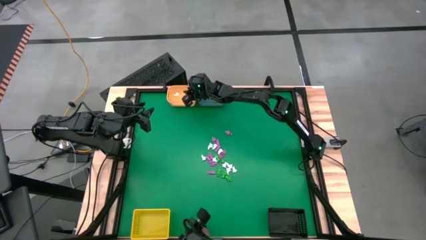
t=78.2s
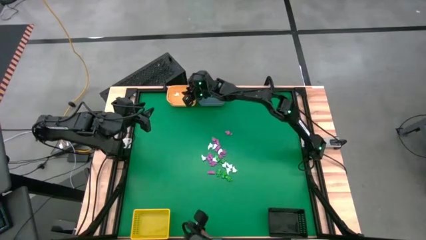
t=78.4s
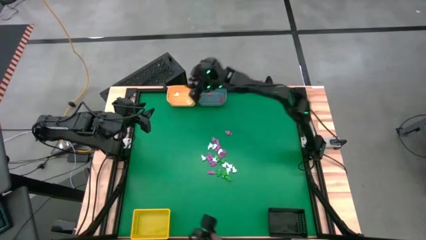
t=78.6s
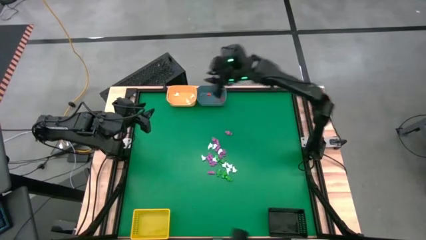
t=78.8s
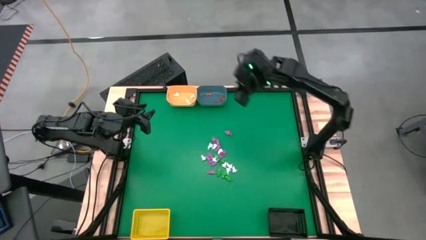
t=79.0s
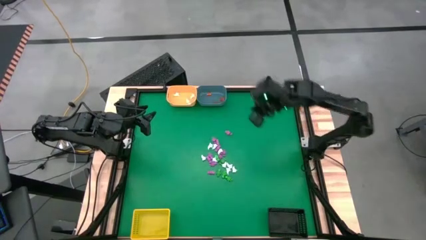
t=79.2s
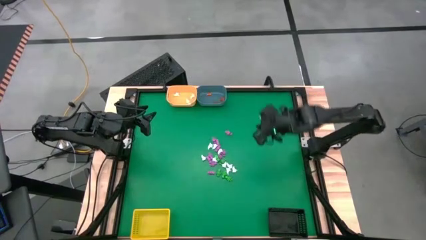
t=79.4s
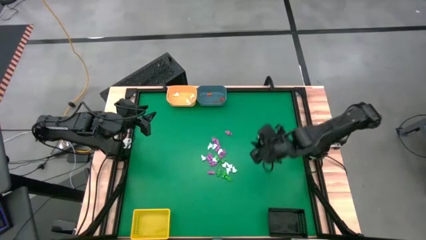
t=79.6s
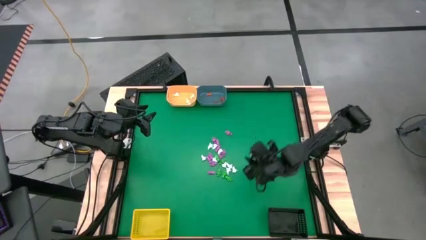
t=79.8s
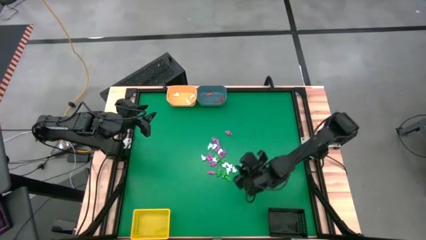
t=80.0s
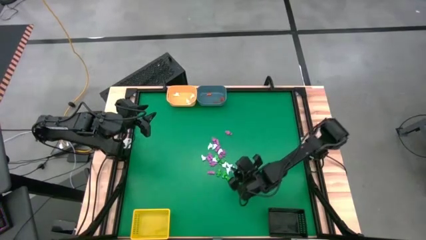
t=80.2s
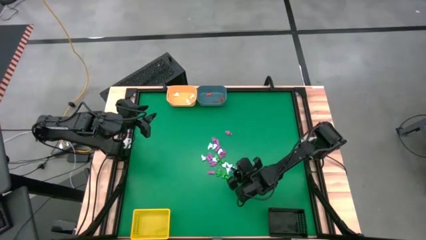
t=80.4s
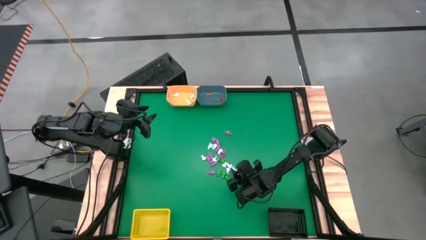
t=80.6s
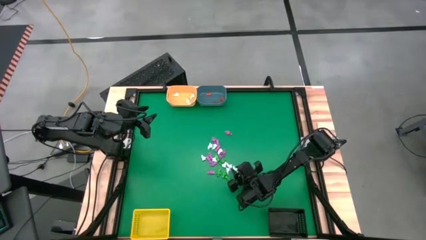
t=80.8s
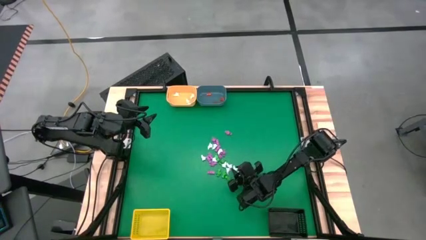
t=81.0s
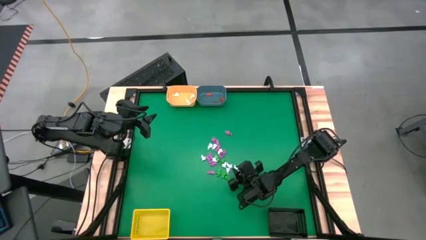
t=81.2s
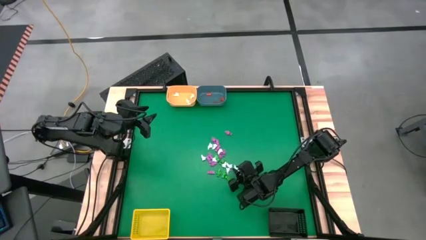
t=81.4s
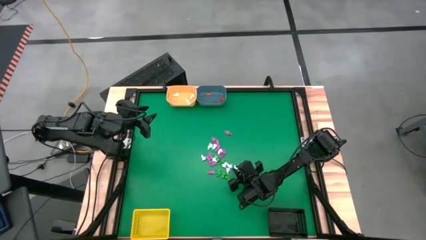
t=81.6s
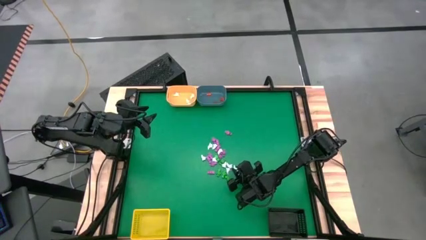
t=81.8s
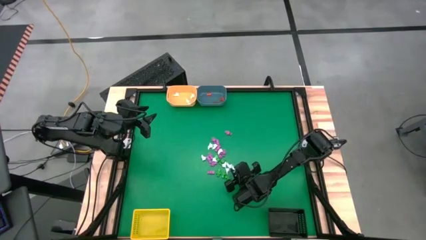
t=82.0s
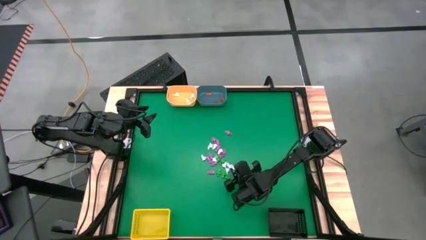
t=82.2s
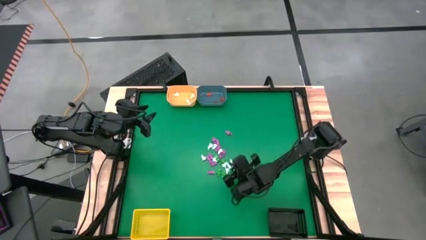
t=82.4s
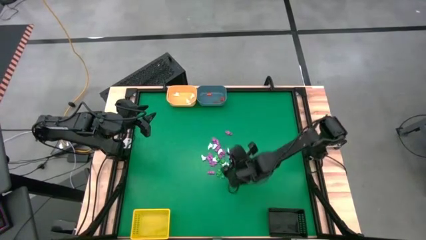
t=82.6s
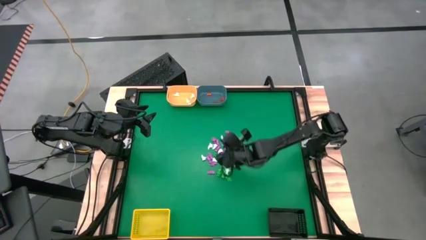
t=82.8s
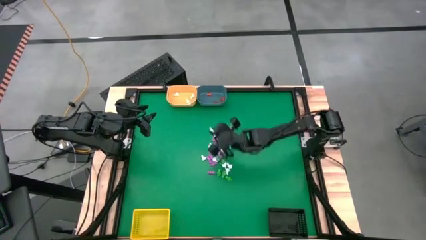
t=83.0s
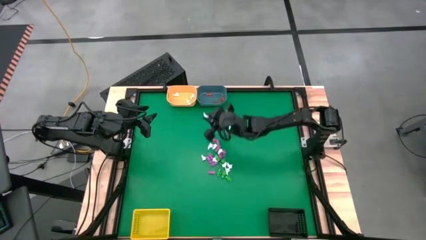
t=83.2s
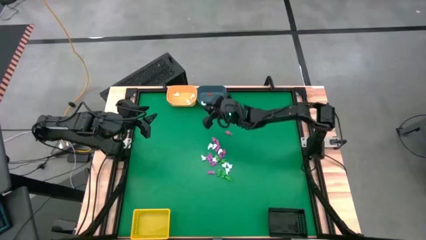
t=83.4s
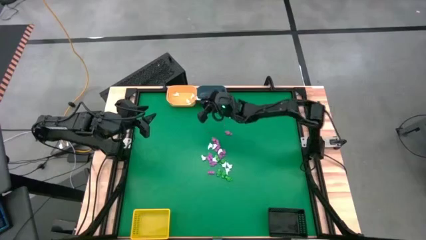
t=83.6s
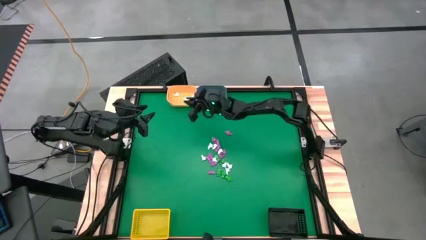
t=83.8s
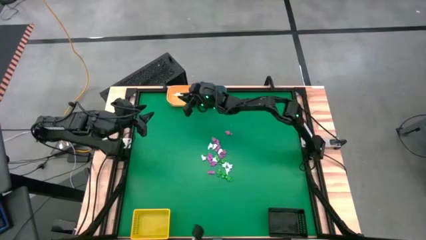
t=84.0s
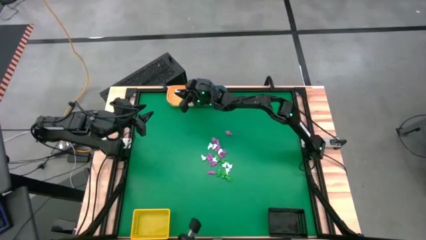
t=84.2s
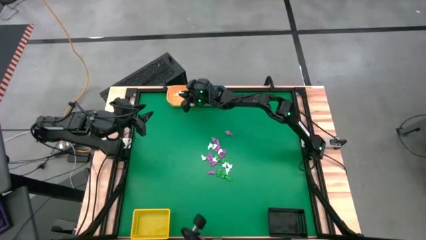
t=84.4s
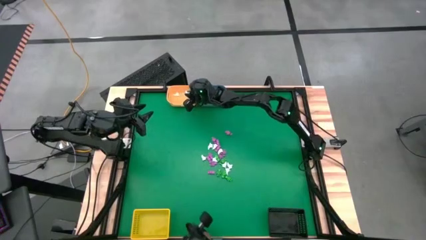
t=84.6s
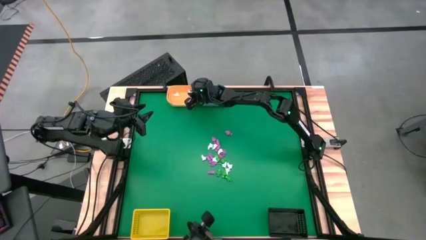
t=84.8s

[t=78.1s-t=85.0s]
Task: Sort Halloween decoration
Put the white ghost into the orange bin

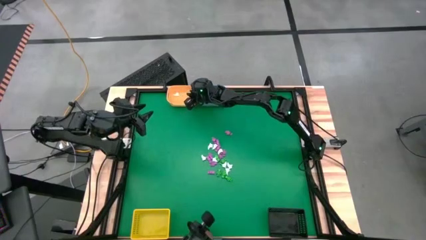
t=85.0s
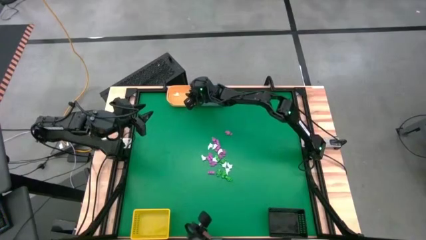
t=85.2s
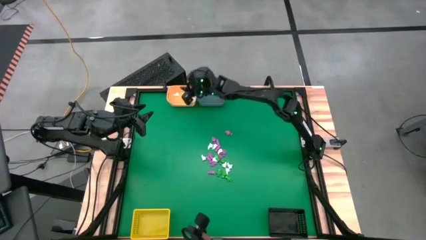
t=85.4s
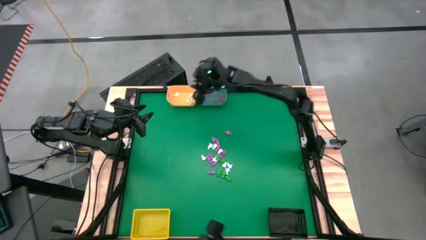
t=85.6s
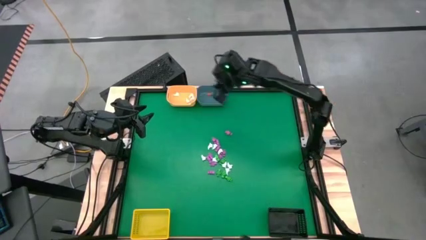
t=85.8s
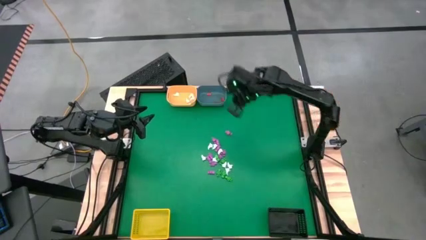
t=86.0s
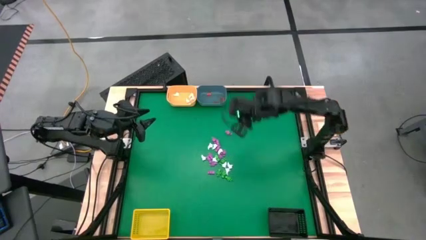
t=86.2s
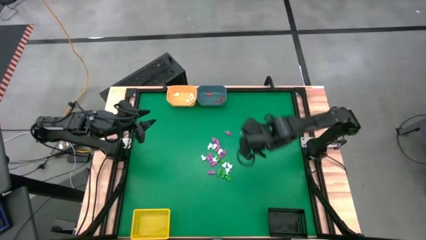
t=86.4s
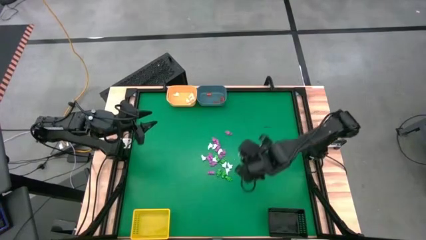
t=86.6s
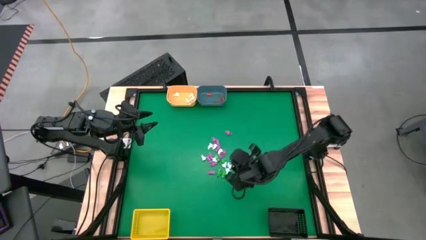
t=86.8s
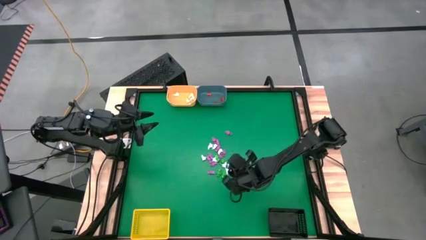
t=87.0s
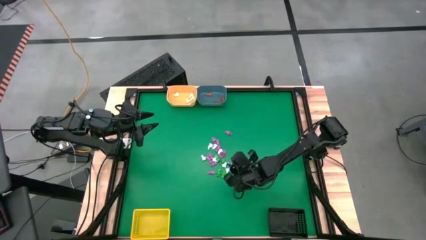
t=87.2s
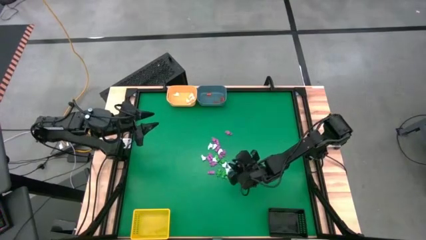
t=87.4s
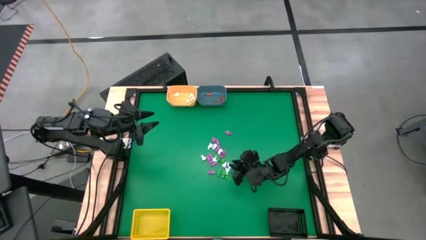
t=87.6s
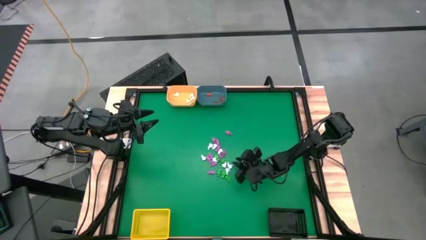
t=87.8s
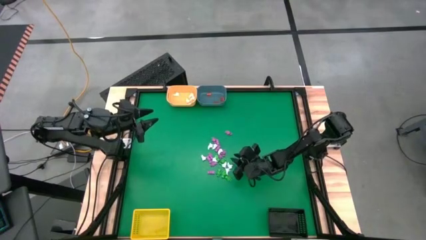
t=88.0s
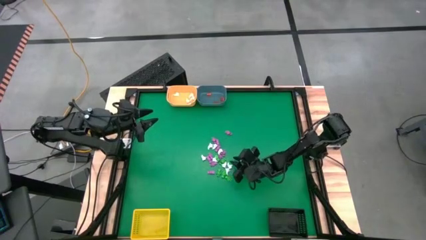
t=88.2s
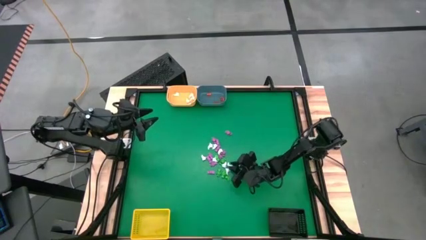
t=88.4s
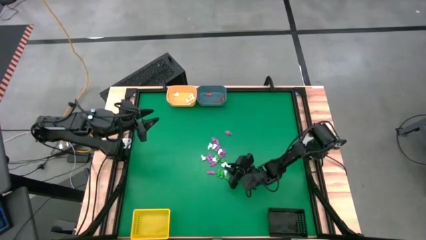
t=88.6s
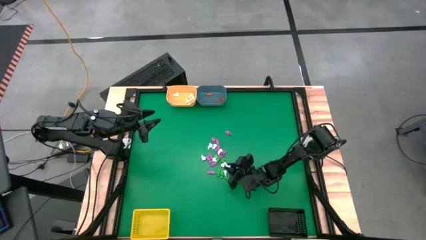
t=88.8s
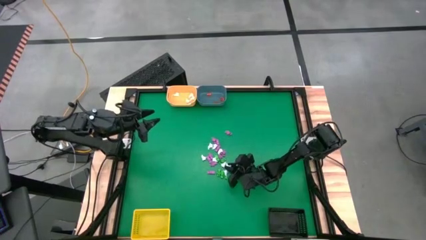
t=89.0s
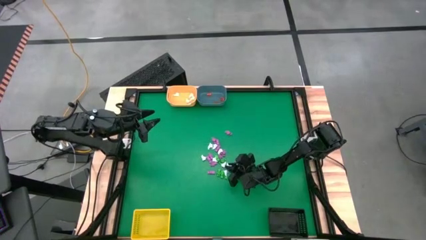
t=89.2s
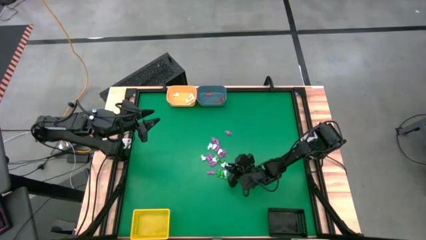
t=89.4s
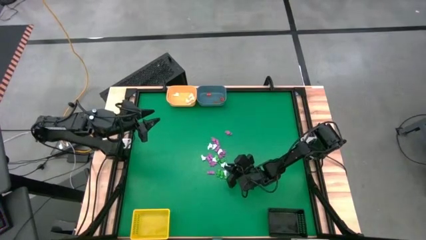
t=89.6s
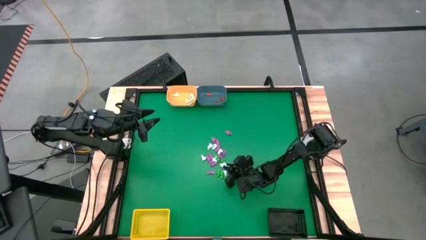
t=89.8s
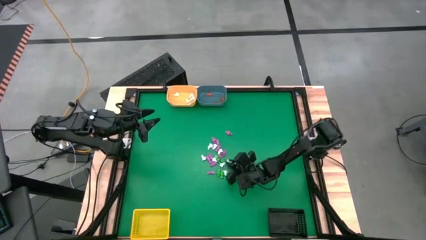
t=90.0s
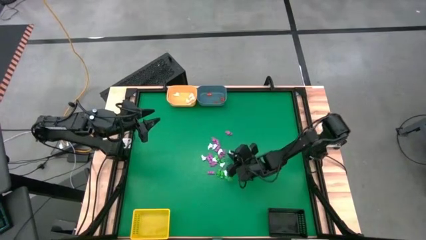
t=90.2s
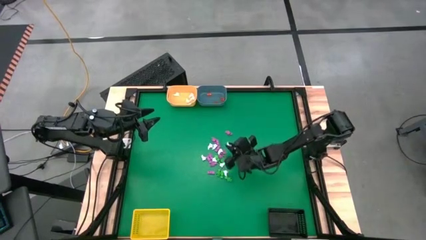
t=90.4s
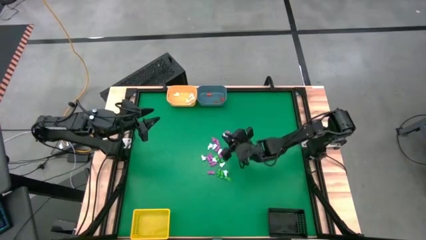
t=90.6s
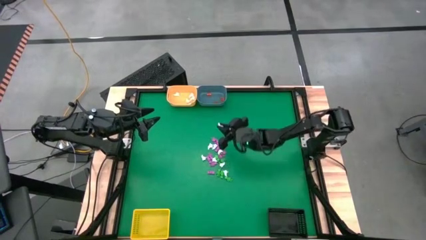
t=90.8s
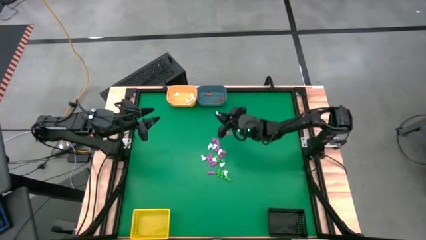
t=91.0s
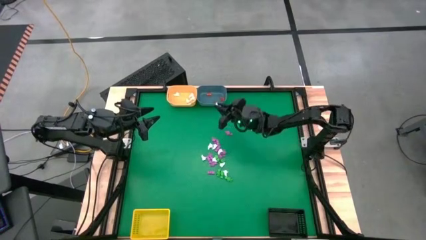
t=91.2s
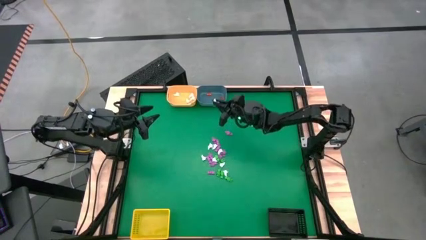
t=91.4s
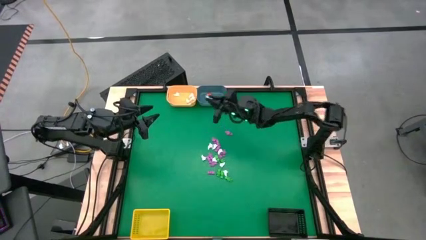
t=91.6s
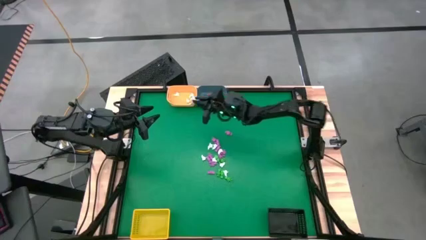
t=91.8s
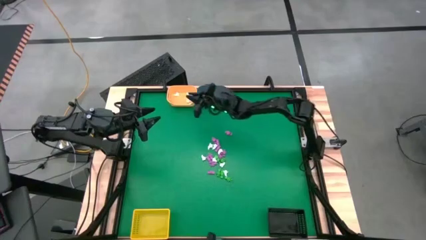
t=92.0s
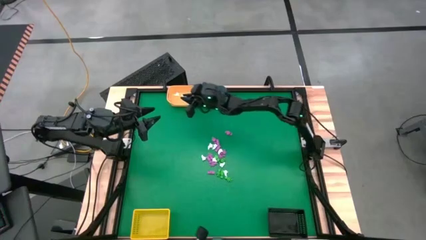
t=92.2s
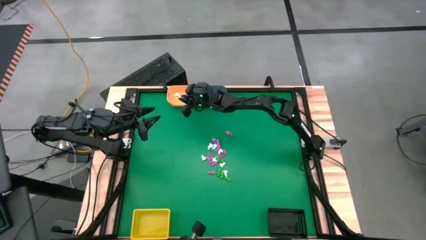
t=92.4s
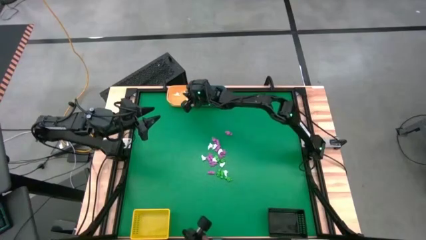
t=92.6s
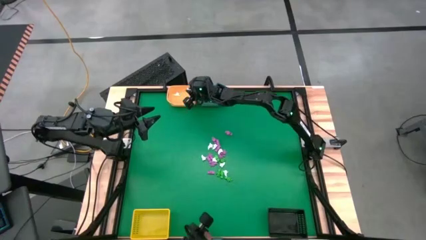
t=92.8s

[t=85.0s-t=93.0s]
Put the white ghost into the orange bin
